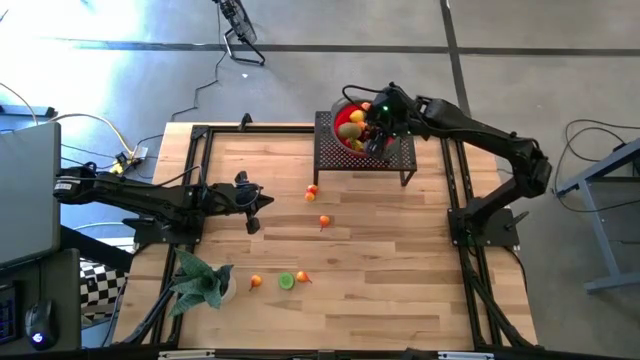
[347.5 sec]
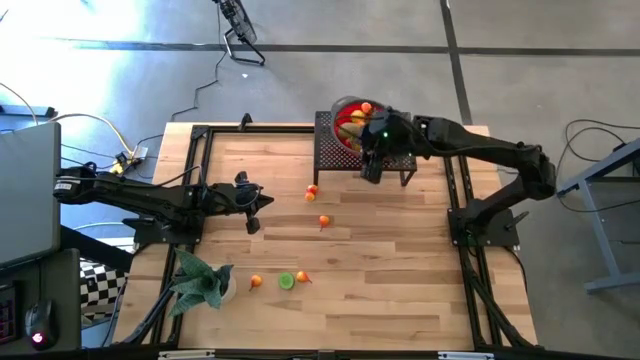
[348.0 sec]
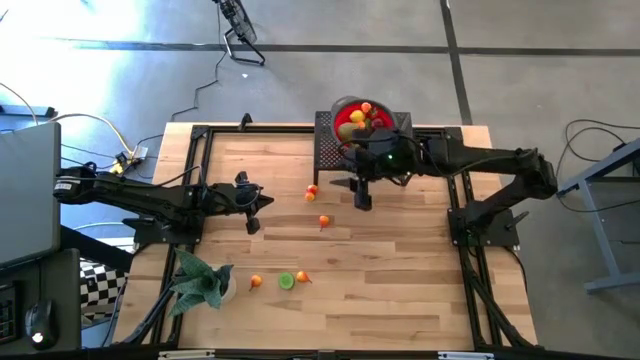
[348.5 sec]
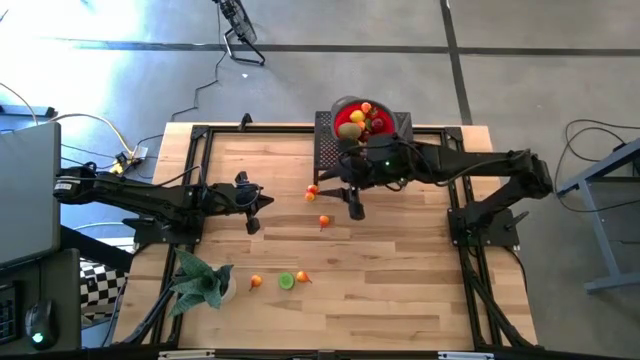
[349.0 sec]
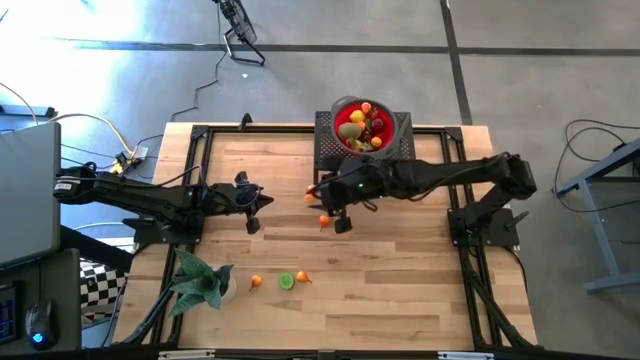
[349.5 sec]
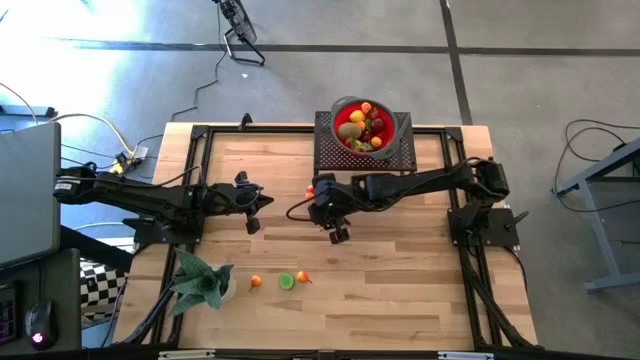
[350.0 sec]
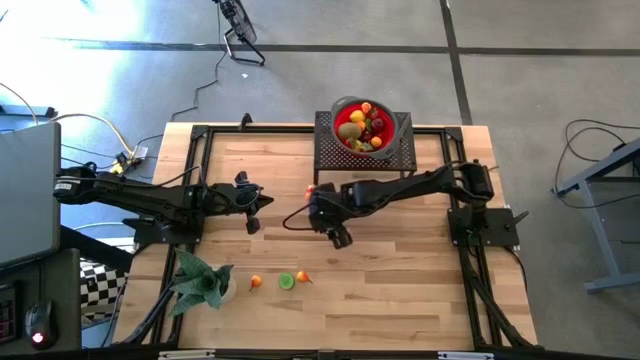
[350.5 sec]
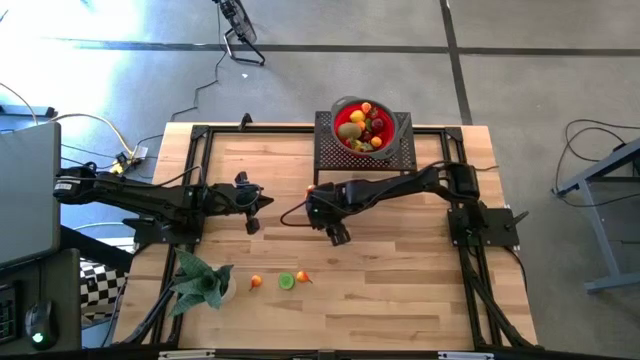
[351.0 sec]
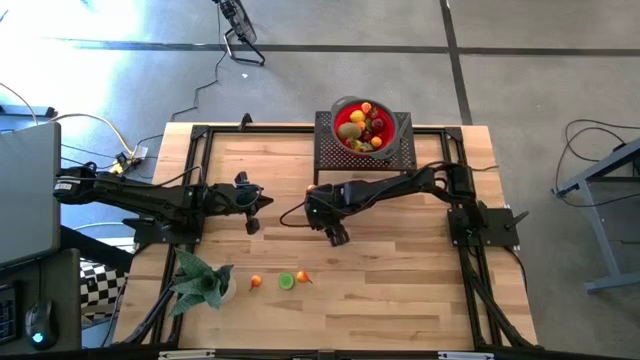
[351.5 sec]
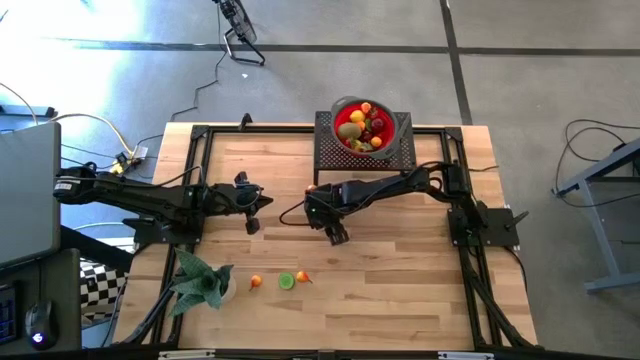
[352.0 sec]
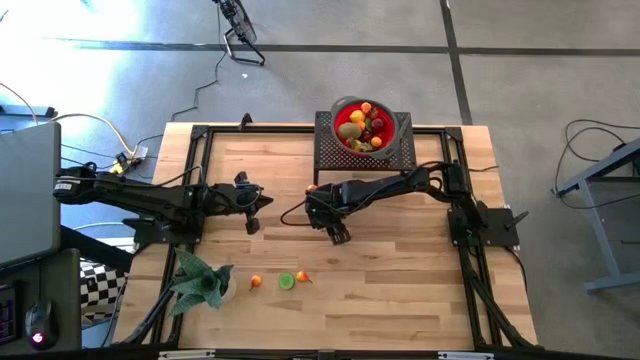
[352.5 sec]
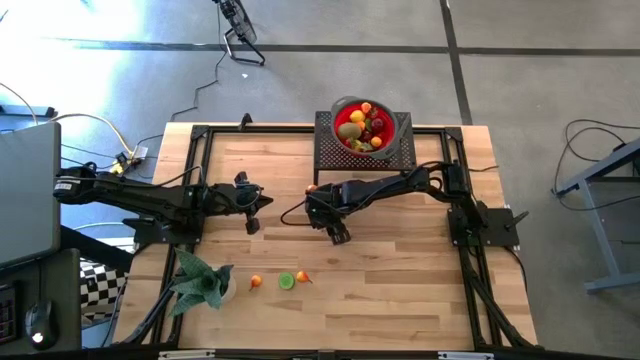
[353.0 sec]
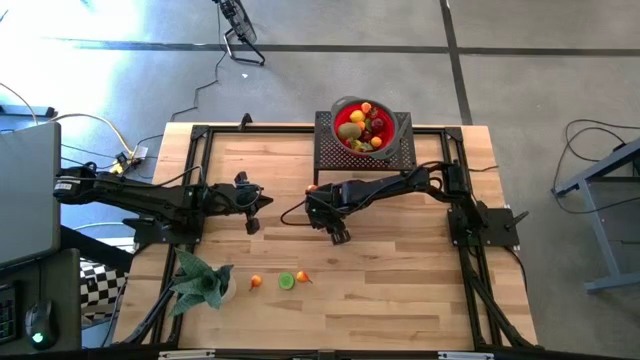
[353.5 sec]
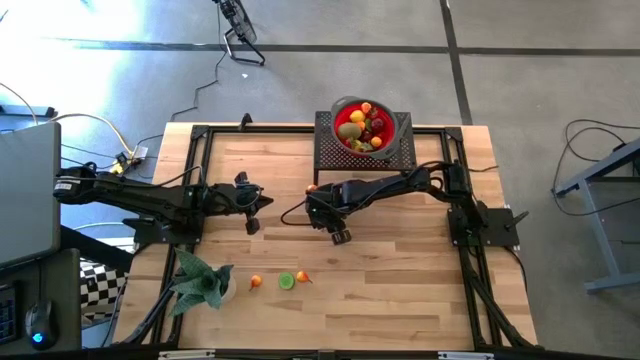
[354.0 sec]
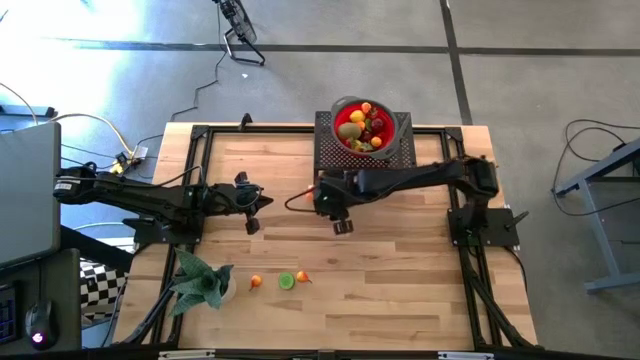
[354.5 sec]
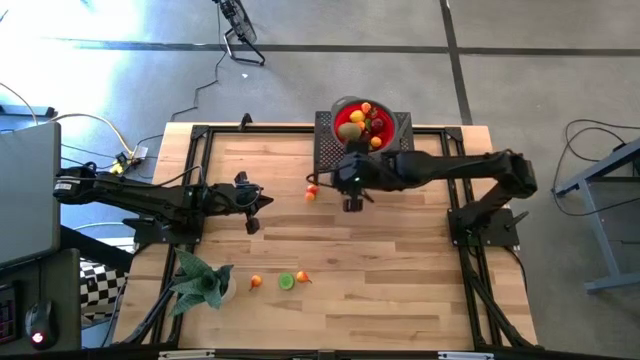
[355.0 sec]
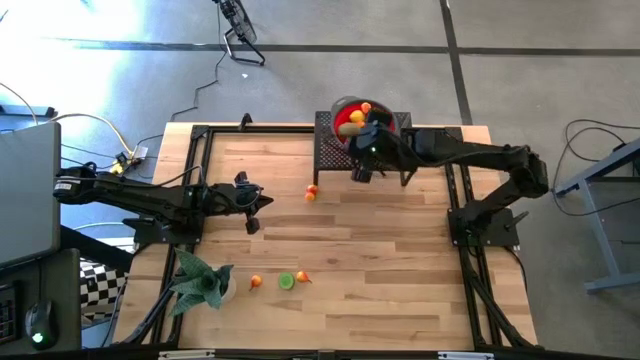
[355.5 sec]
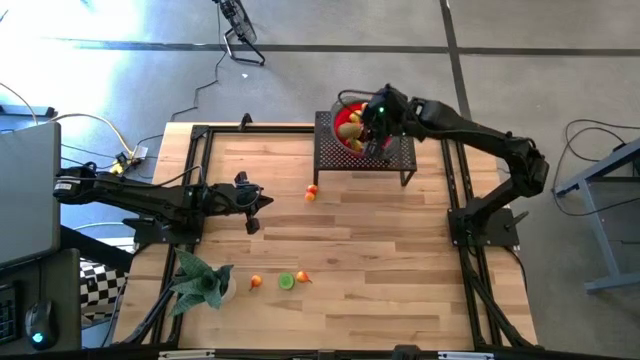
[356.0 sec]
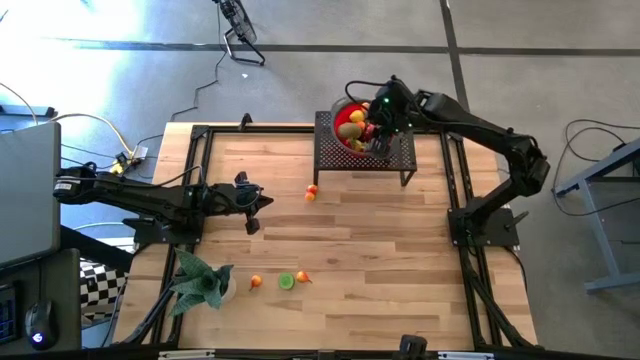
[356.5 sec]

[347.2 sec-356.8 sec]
Task: Pick & Place Fruit
Put the pear into the strainer on the shelf

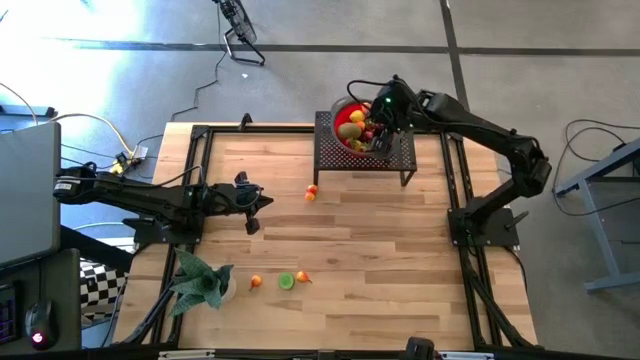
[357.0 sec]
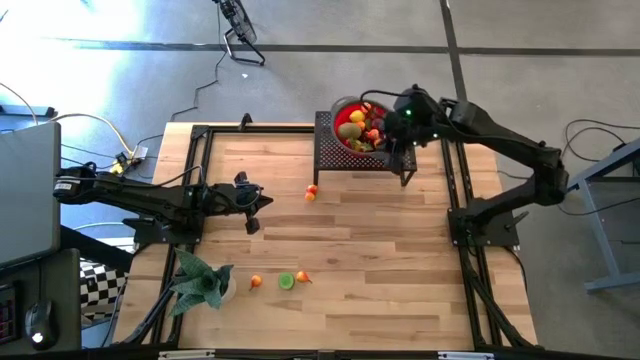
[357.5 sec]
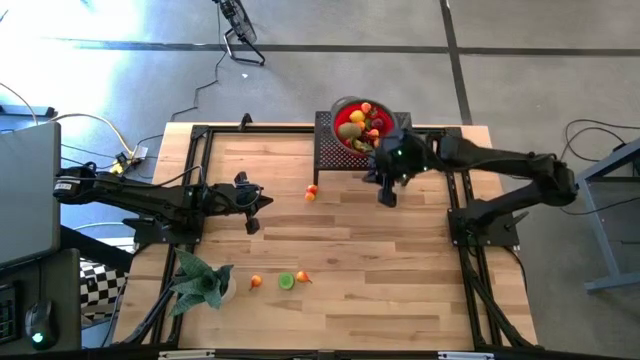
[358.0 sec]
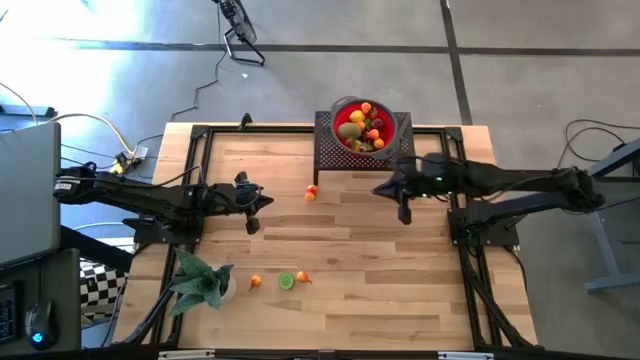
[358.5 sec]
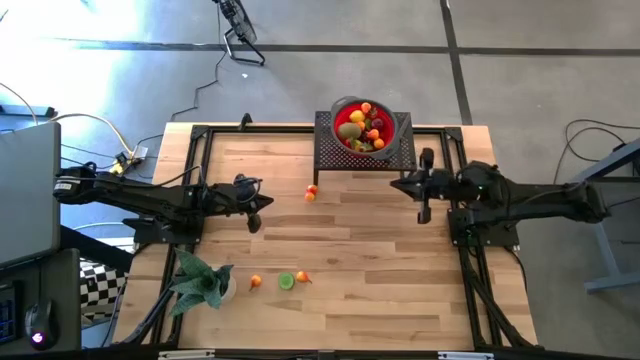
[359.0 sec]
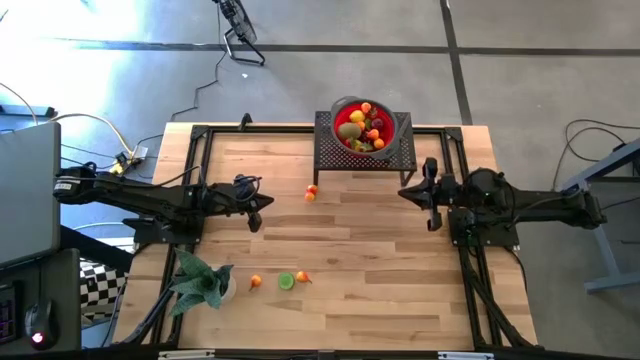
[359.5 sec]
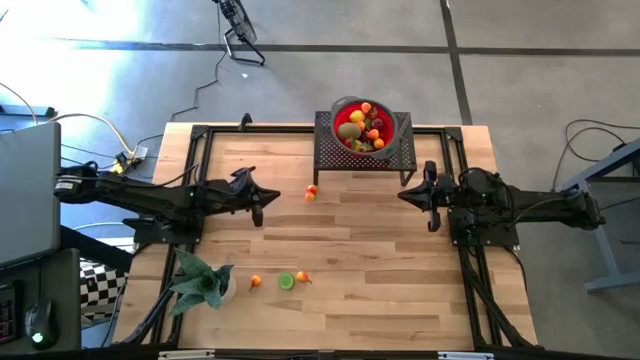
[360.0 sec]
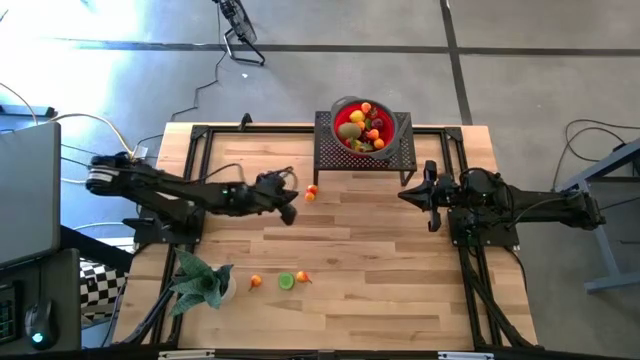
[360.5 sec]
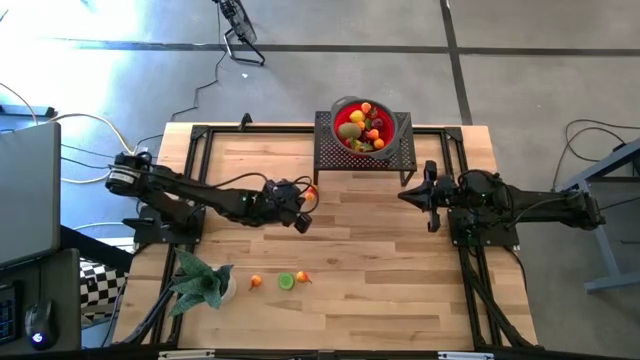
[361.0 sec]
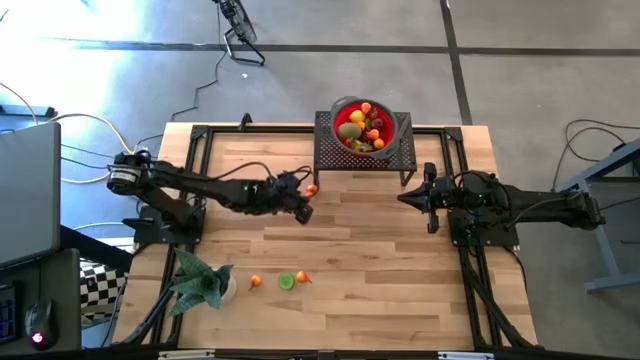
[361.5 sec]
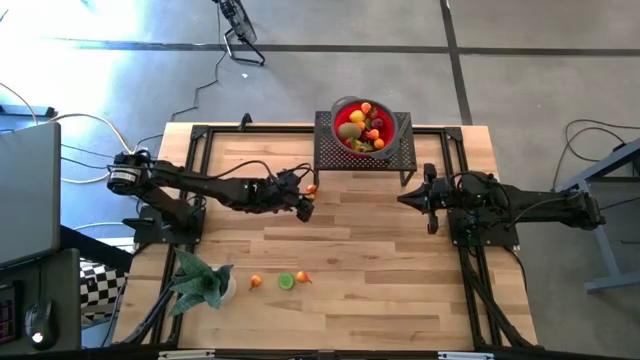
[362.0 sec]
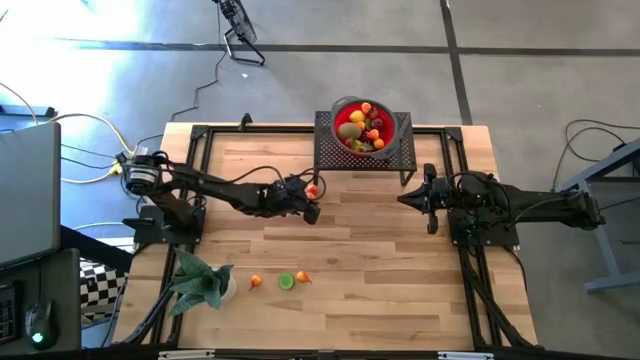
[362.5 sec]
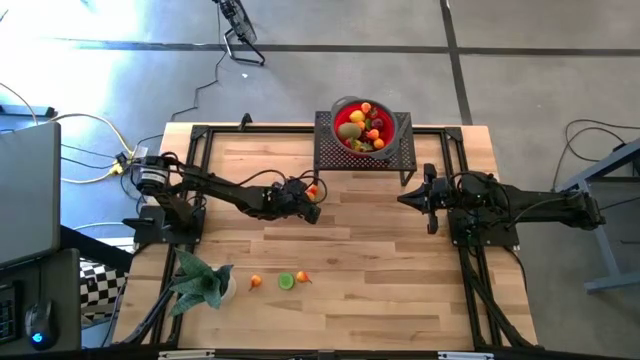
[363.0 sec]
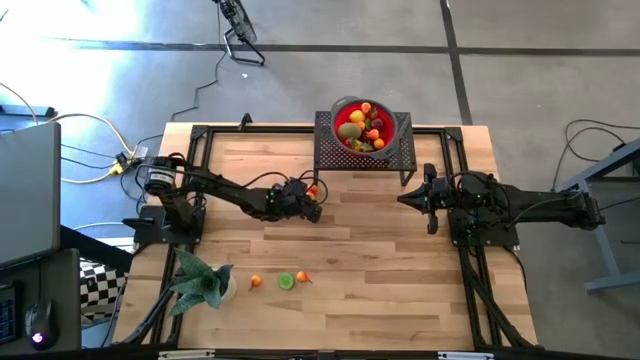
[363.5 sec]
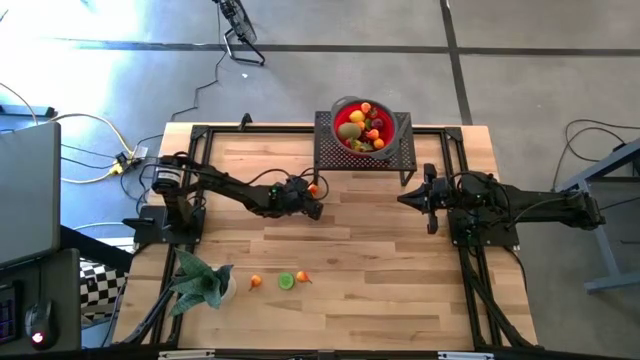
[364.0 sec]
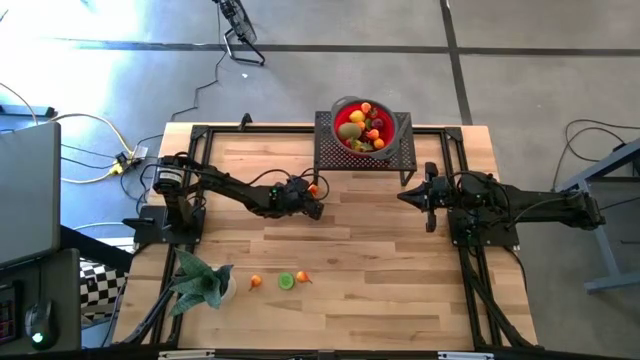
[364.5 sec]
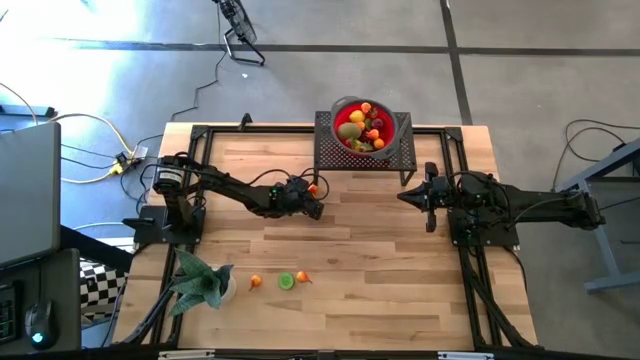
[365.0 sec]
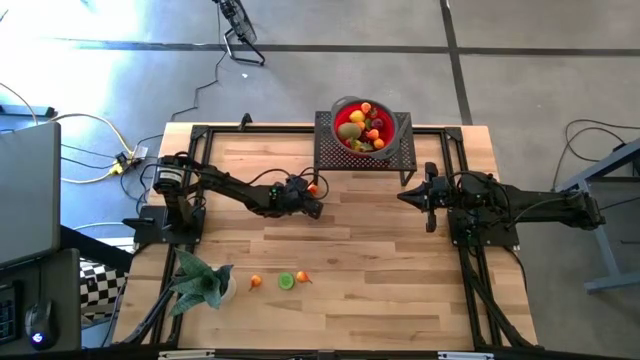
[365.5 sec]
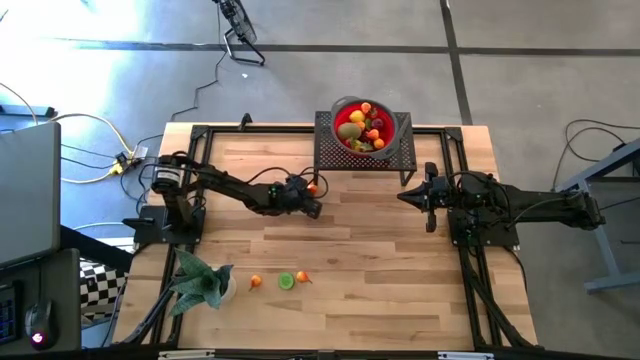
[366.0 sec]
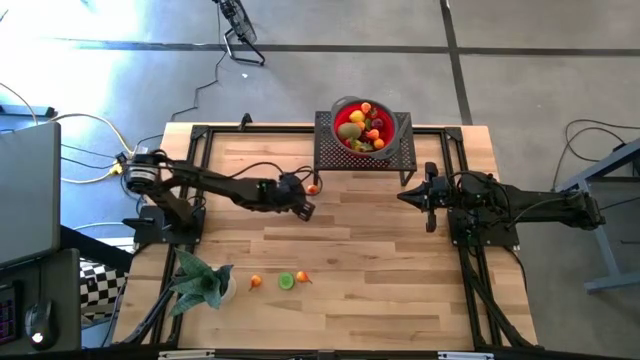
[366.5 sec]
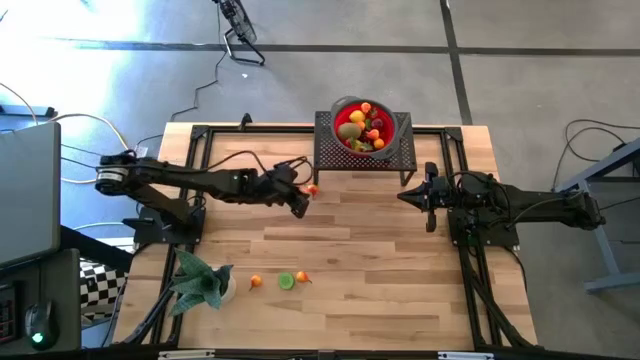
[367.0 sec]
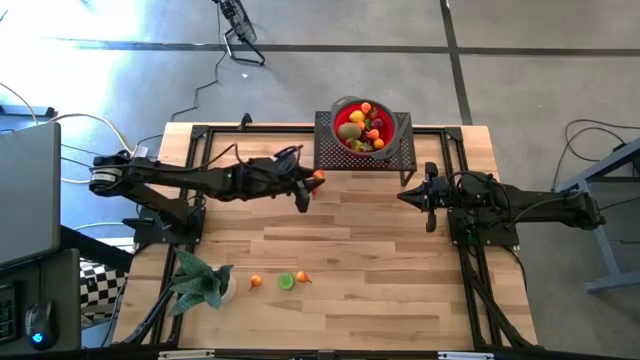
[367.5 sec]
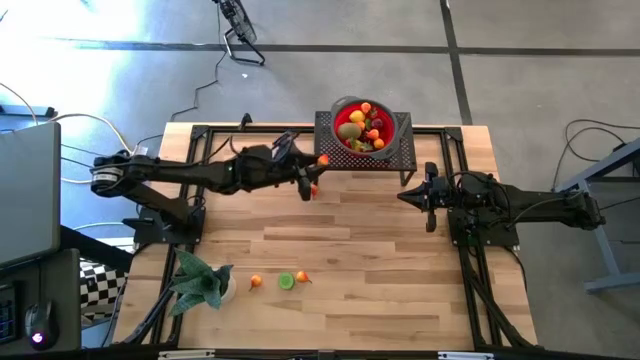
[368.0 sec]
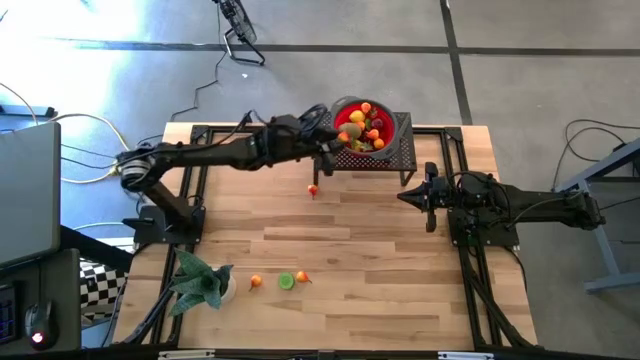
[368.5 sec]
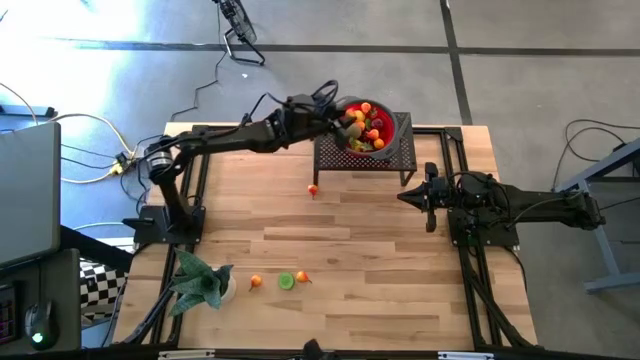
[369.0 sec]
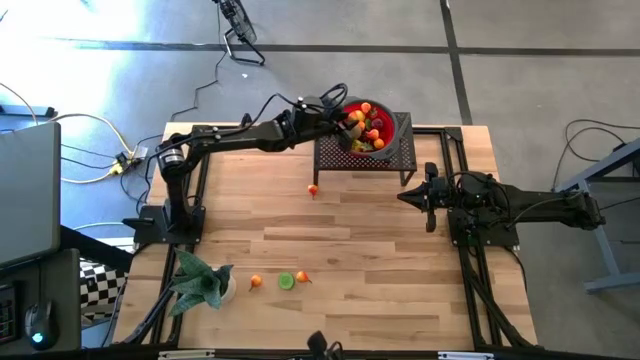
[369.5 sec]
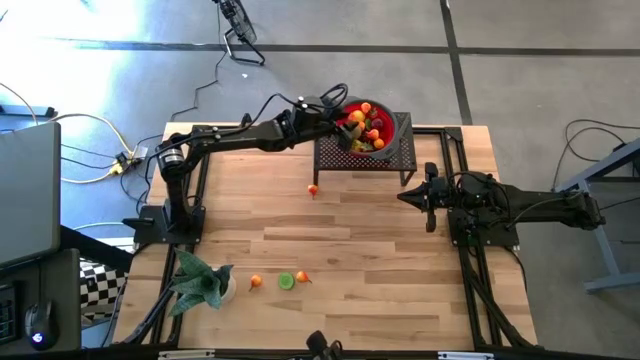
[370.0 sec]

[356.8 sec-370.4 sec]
Put the pear into the strainer on the shelf
